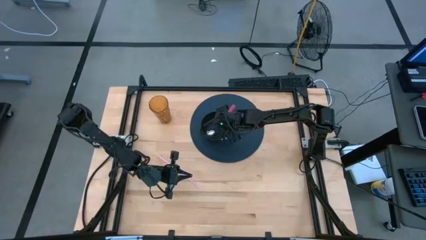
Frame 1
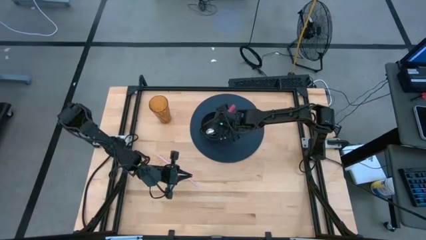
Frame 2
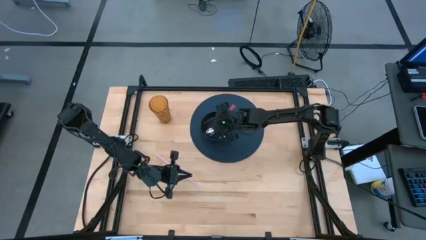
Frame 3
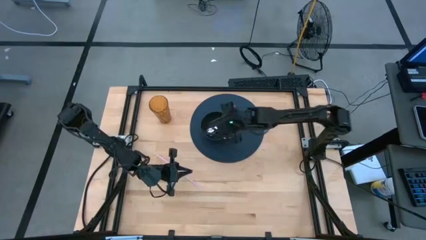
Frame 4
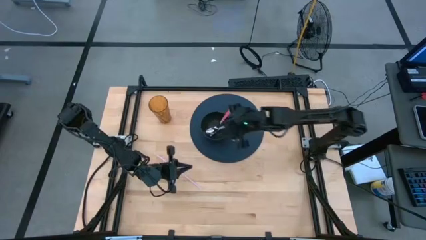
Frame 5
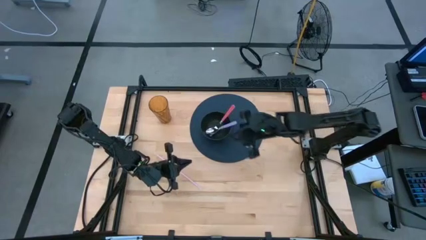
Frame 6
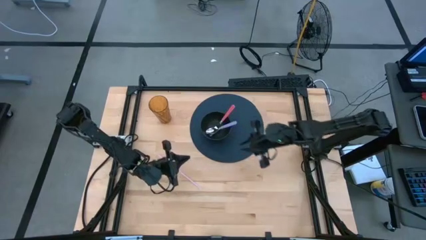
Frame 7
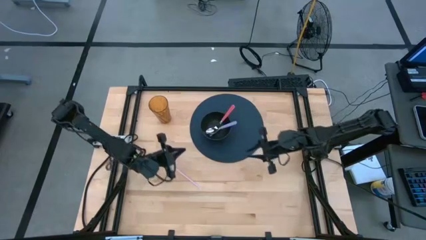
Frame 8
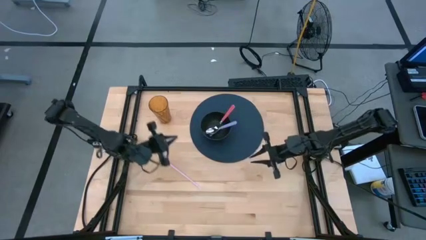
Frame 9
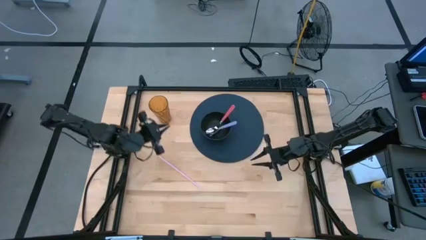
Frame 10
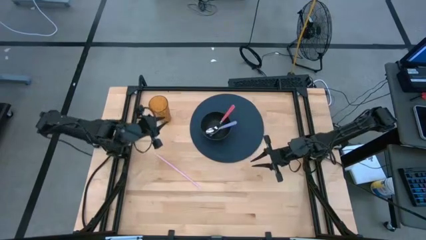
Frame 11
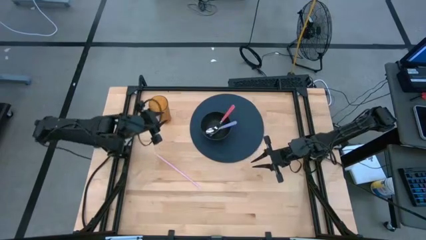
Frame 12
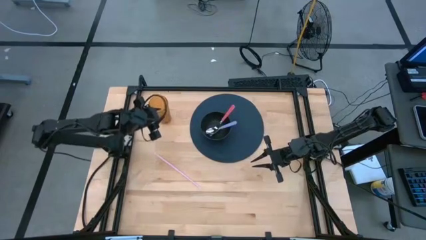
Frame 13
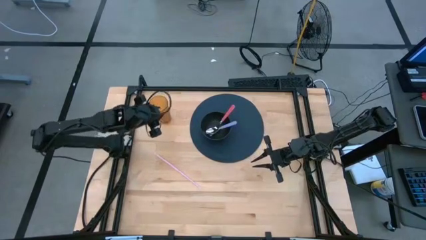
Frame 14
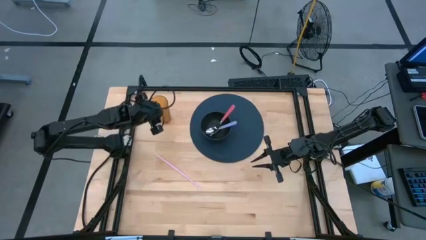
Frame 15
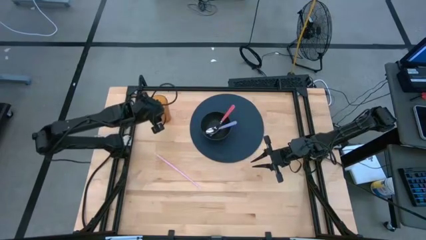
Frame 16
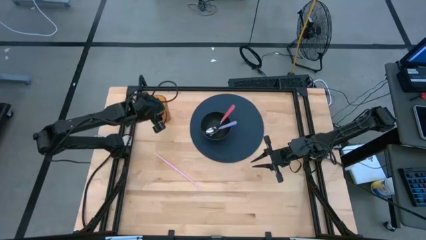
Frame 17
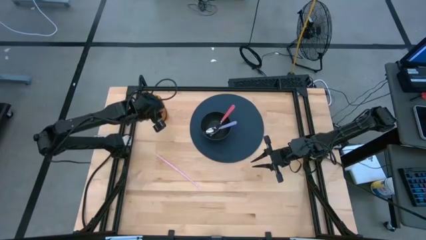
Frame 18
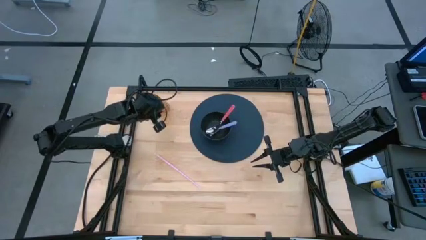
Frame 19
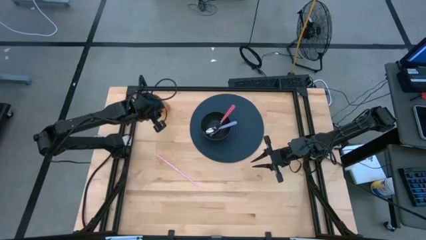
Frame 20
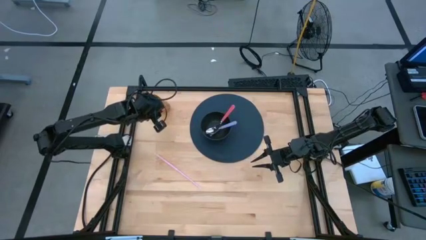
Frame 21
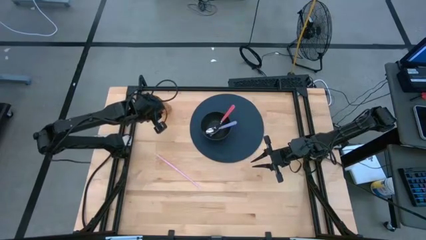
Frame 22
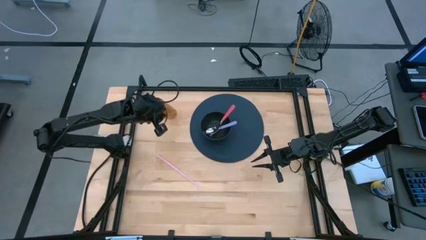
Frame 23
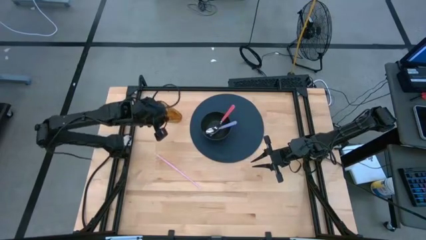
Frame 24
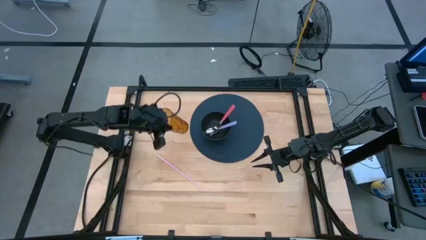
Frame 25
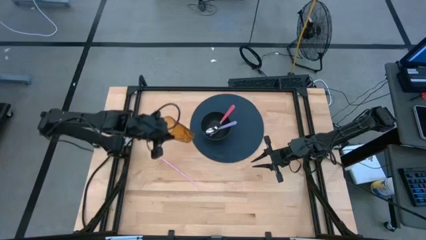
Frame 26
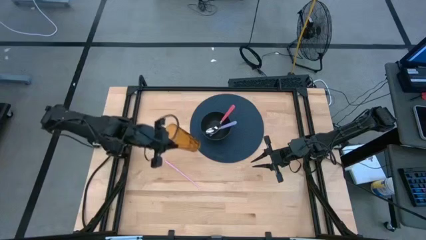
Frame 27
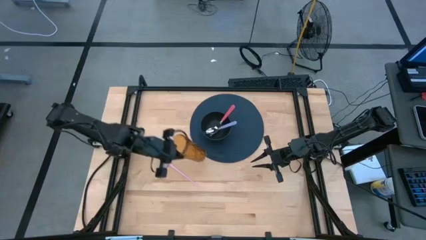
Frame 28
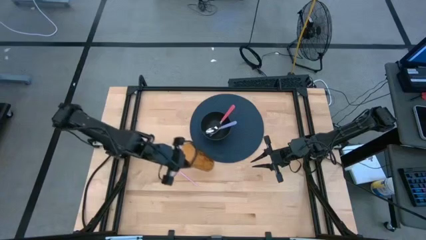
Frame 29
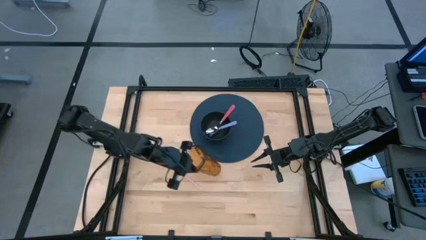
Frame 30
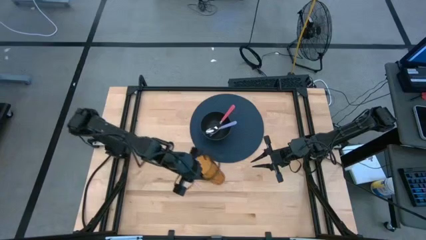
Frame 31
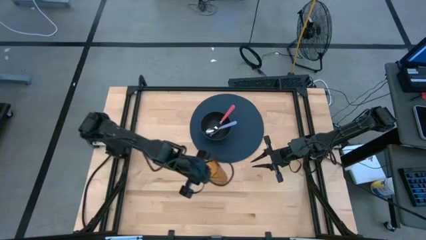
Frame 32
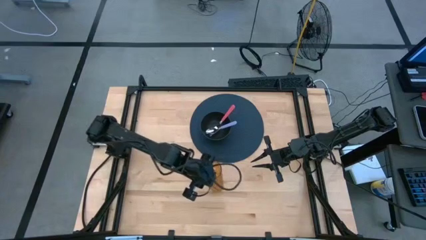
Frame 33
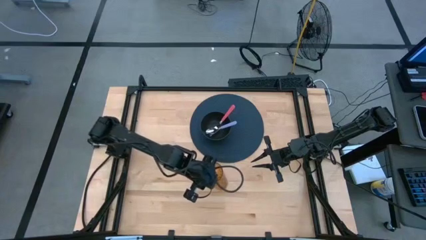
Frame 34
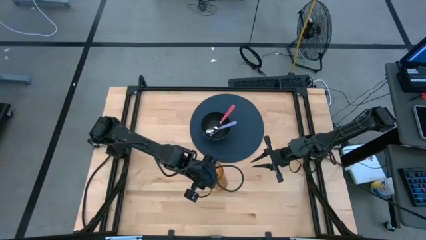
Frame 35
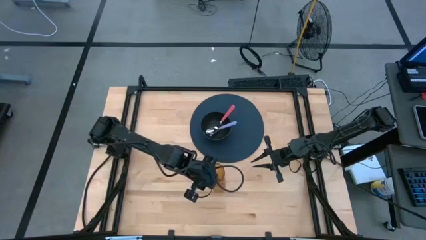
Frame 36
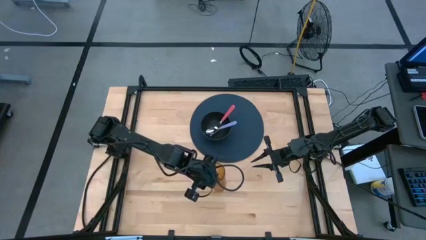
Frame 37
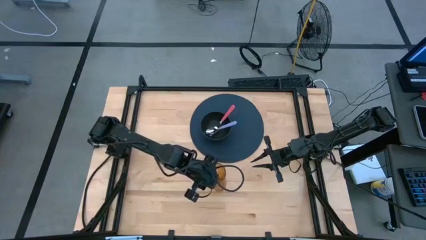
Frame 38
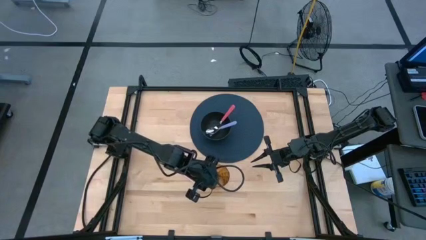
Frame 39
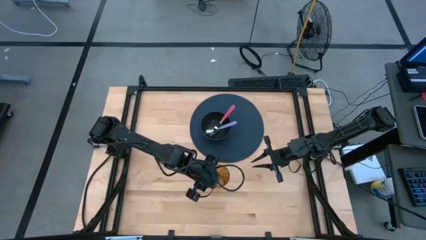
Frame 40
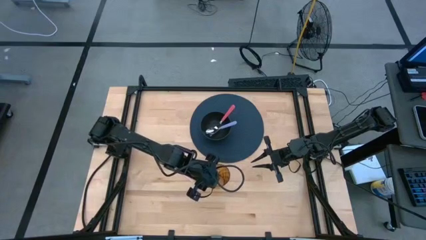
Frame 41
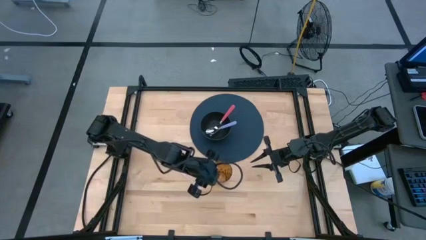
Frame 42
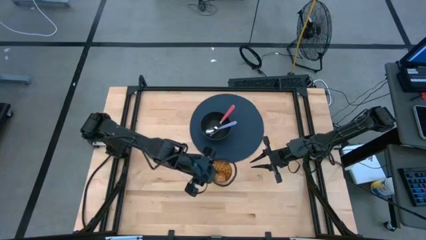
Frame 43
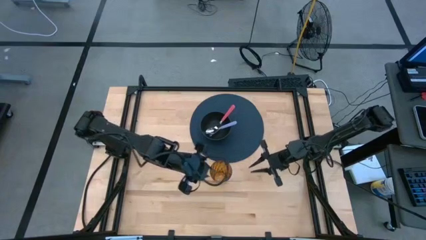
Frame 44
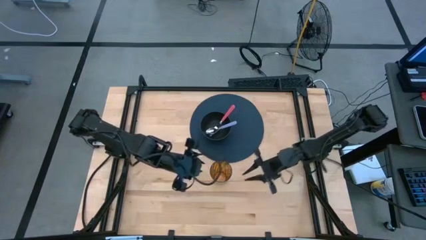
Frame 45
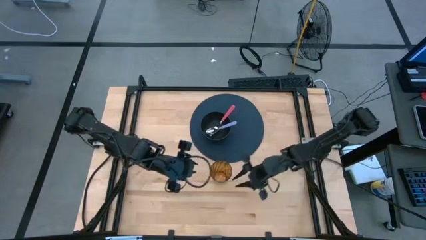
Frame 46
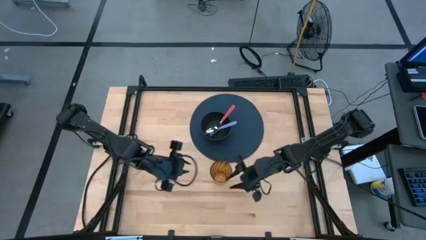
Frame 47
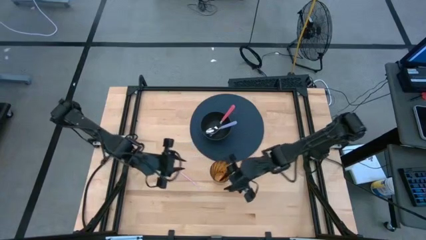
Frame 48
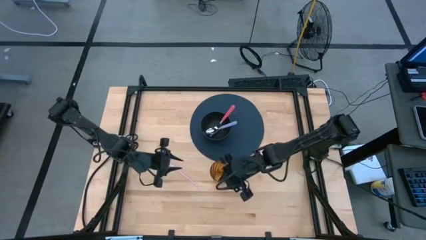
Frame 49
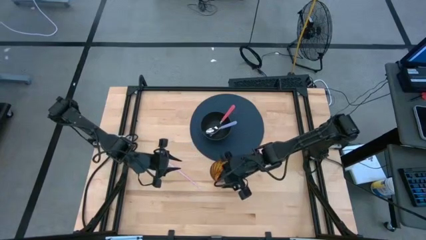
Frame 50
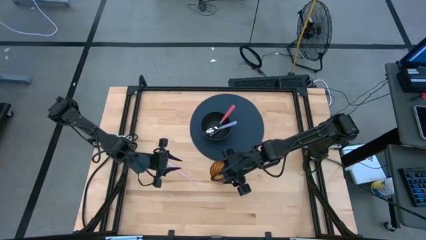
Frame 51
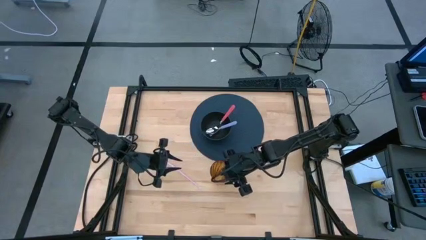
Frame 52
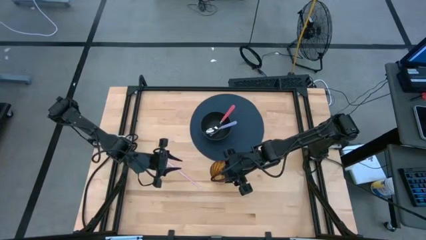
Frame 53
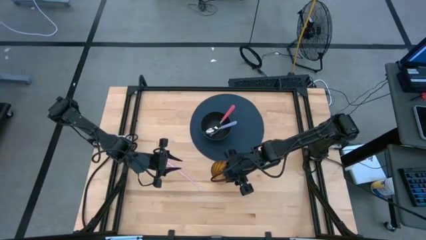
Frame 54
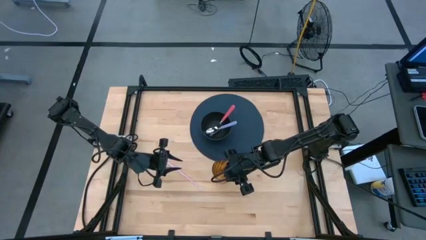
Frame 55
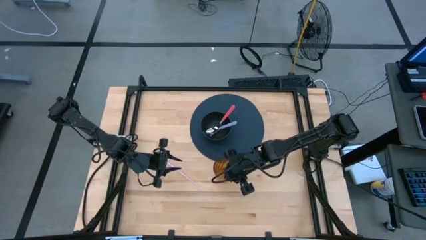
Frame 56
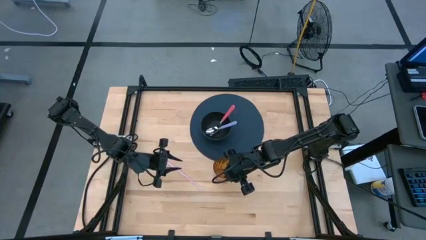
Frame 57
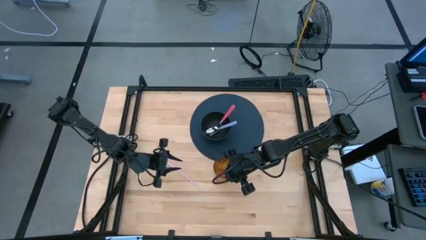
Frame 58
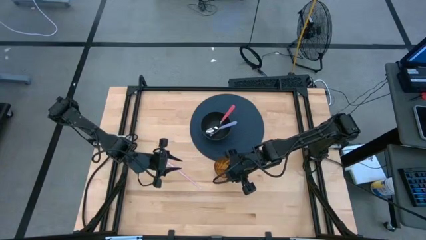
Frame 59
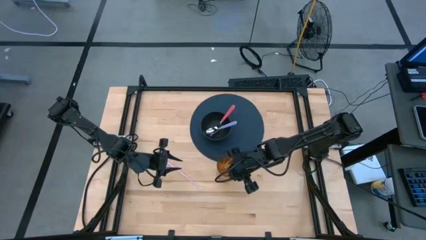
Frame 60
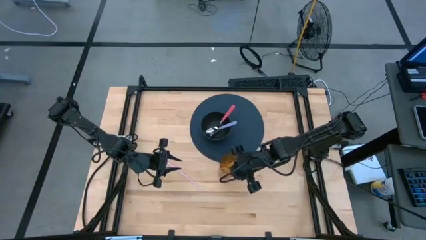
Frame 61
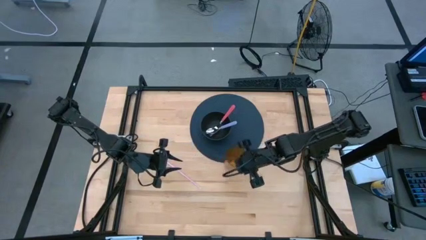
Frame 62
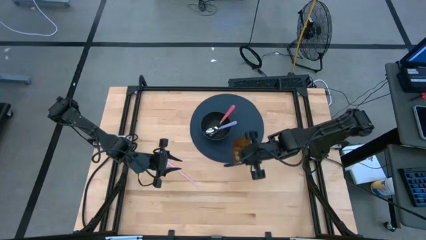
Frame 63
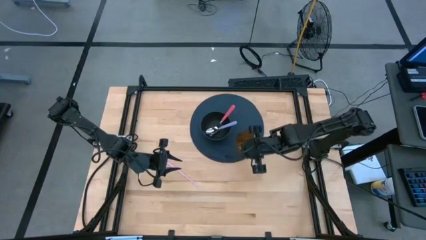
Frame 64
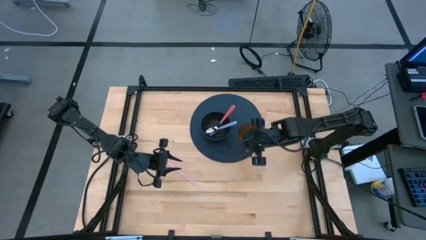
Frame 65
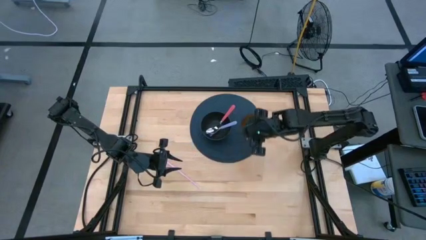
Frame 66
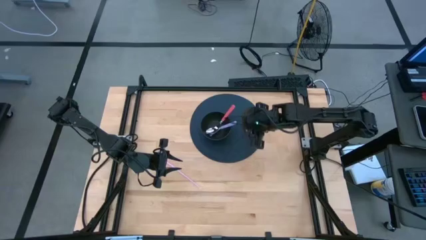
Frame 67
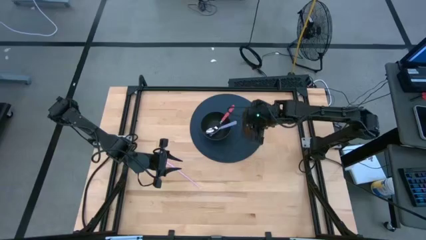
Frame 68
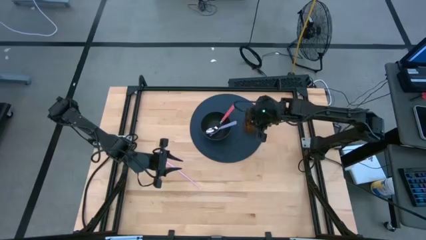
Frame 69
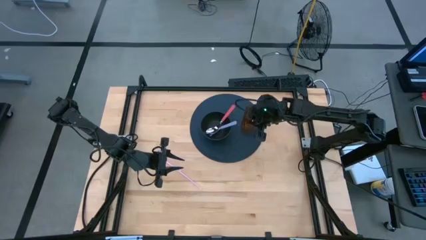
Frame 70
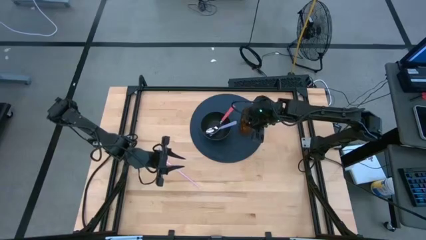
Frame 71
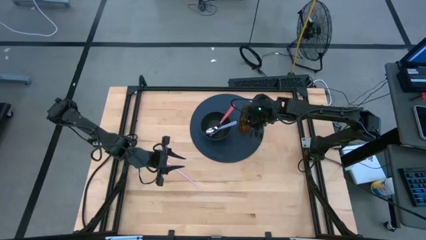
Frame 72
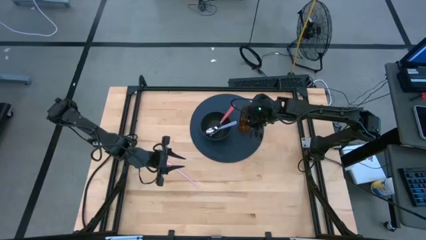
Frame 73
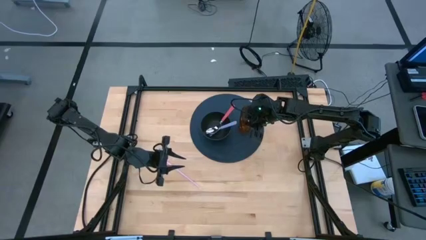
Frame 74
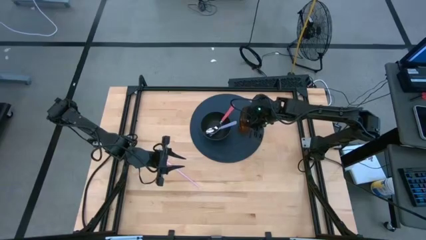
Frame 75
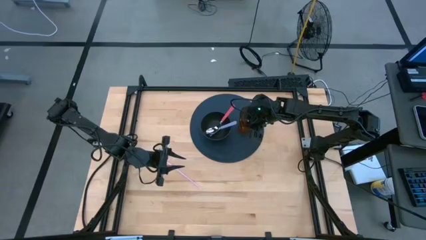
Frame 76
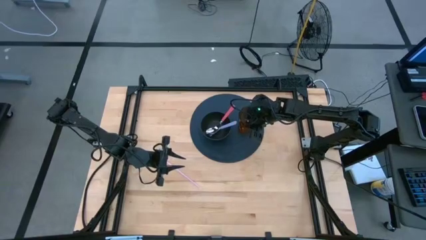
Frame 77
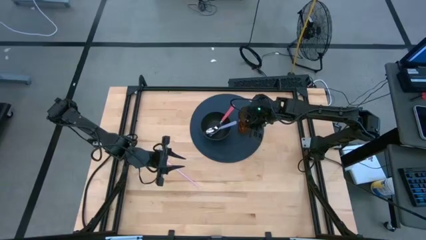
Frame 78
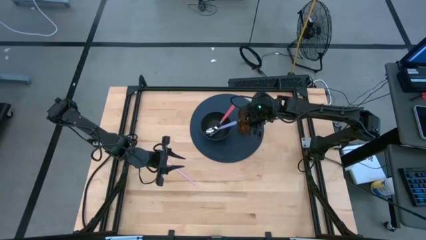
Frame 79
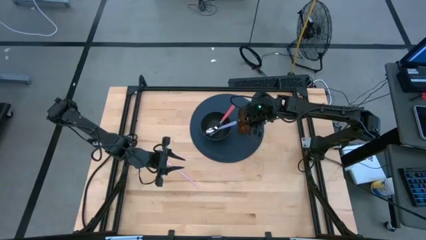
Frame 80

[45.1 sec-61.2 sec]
Task: Pick & Place Utensil
Put the cup on the mat to the right of the bowl
